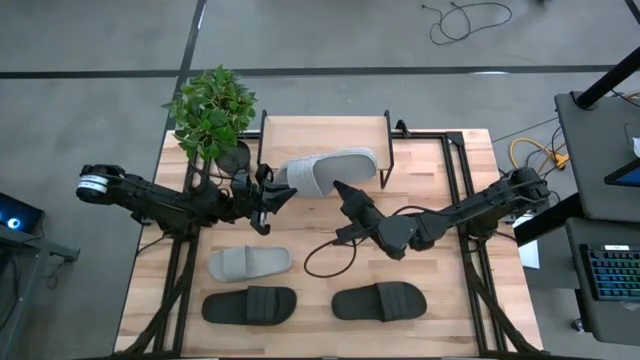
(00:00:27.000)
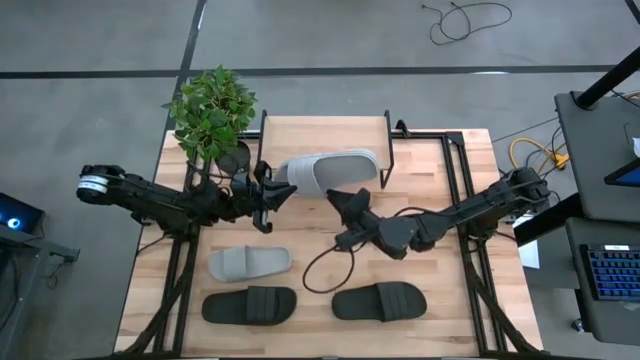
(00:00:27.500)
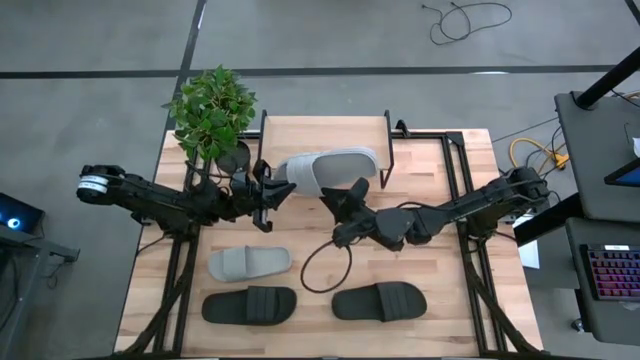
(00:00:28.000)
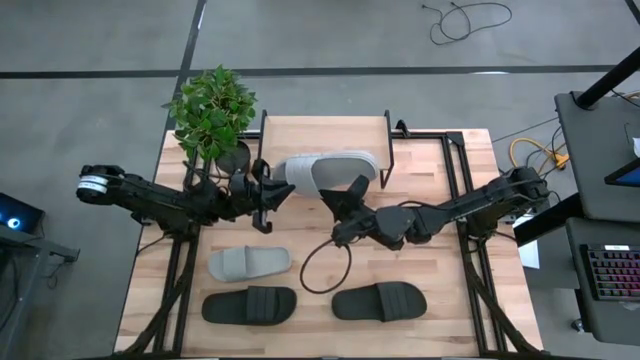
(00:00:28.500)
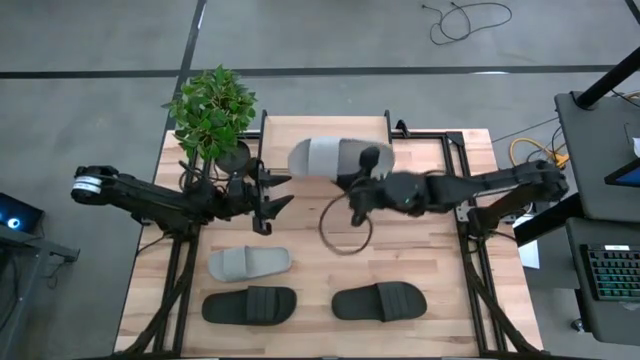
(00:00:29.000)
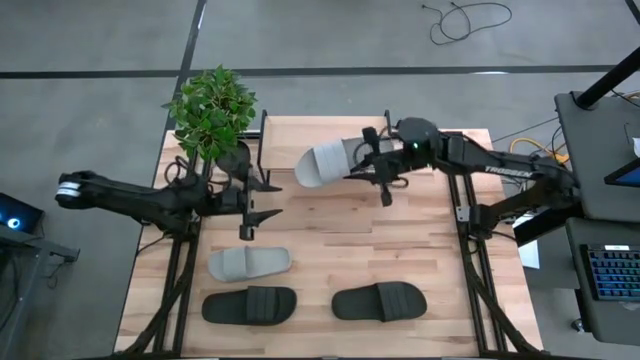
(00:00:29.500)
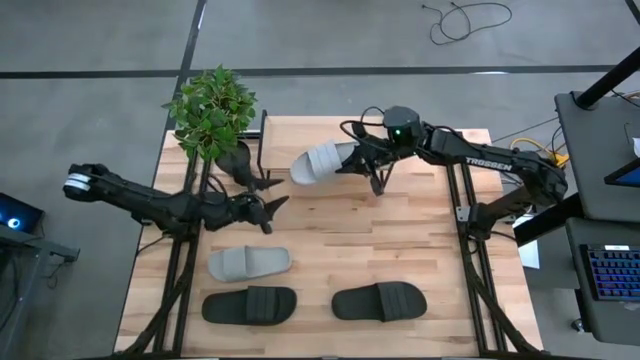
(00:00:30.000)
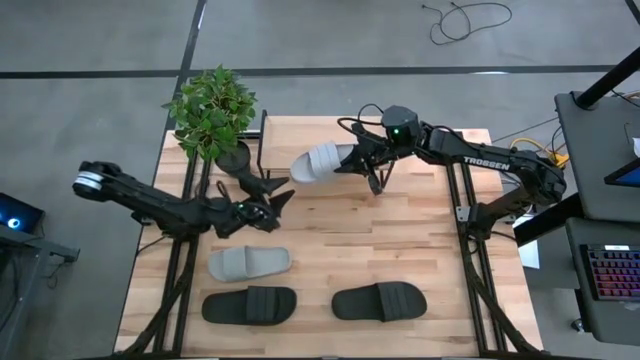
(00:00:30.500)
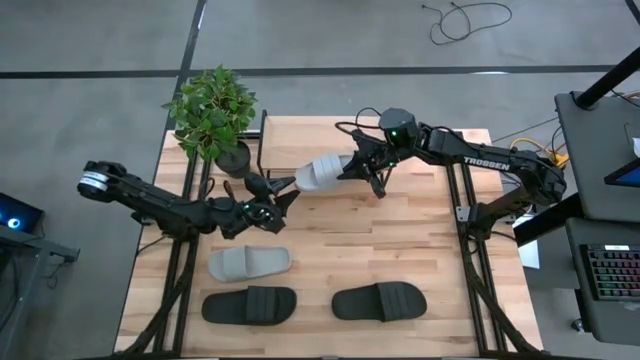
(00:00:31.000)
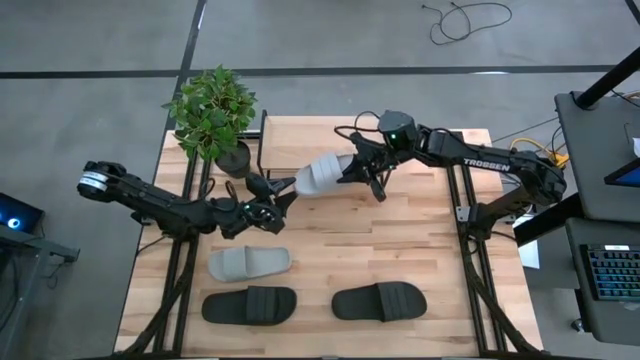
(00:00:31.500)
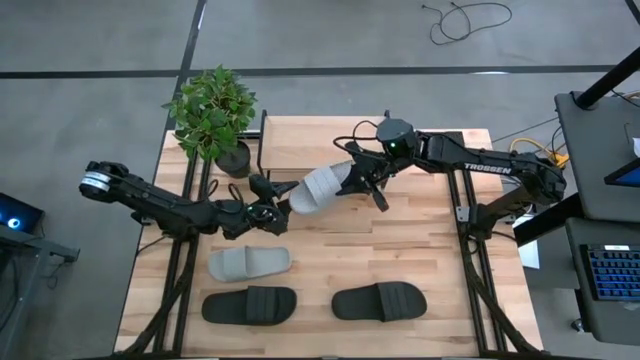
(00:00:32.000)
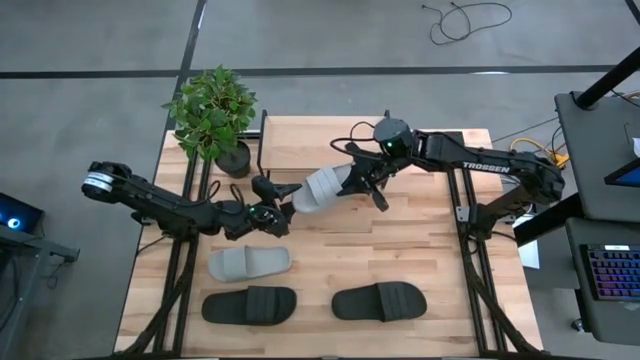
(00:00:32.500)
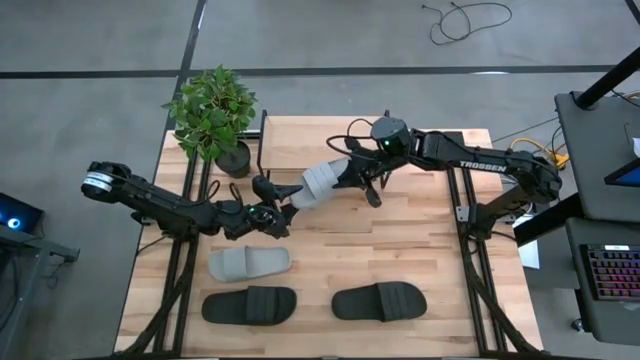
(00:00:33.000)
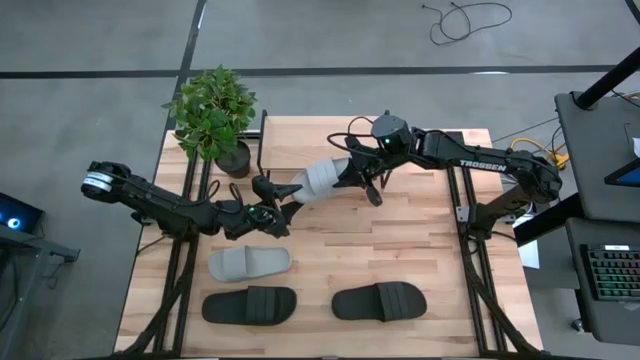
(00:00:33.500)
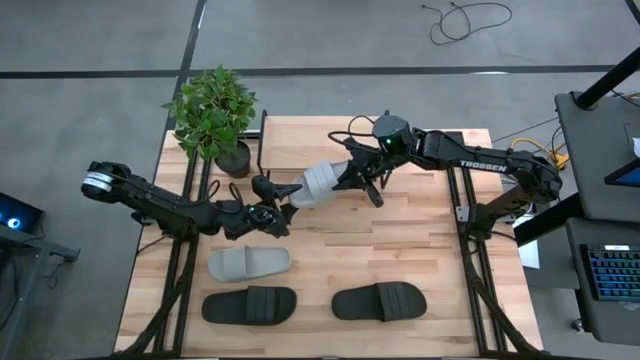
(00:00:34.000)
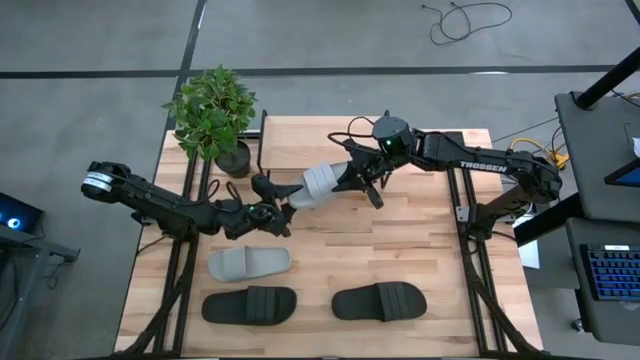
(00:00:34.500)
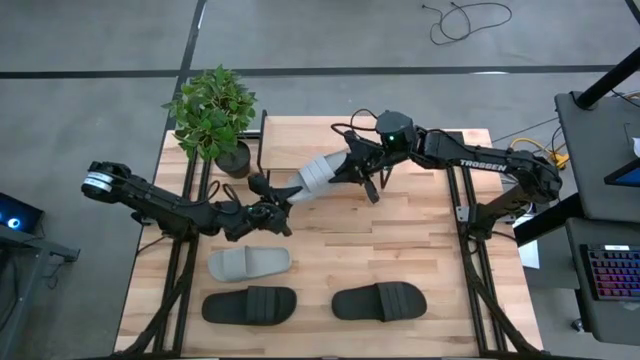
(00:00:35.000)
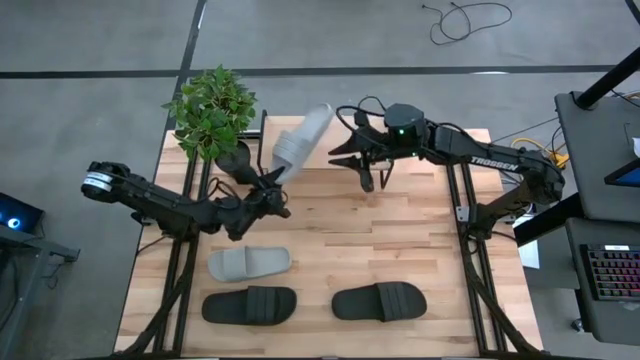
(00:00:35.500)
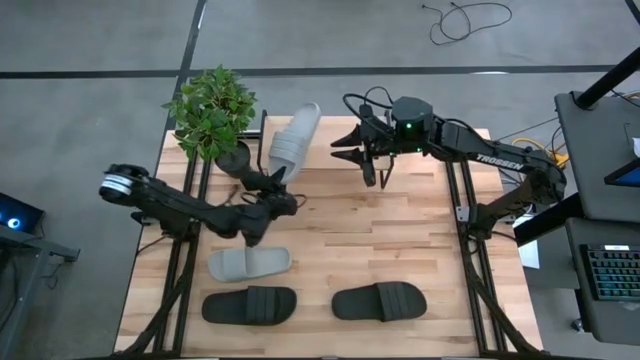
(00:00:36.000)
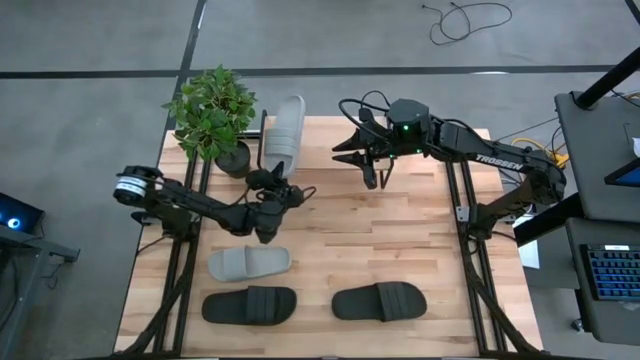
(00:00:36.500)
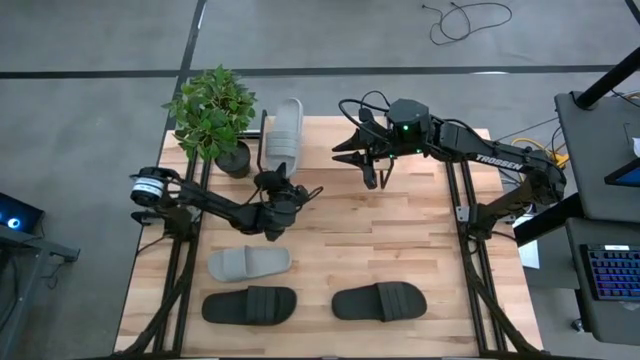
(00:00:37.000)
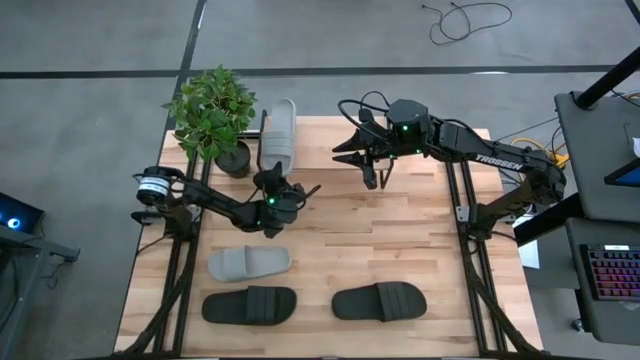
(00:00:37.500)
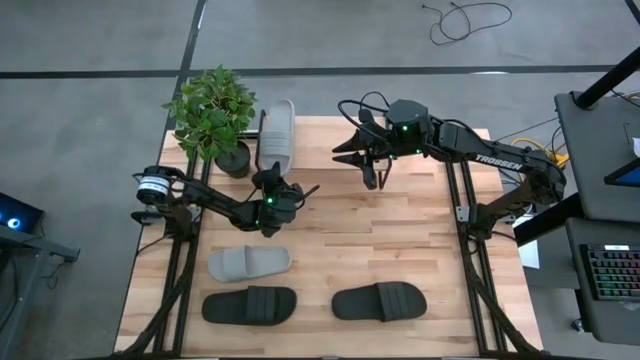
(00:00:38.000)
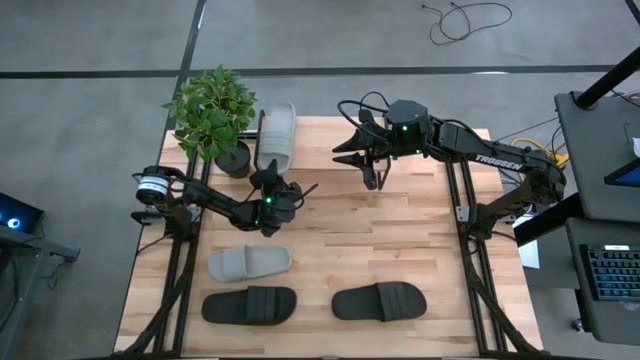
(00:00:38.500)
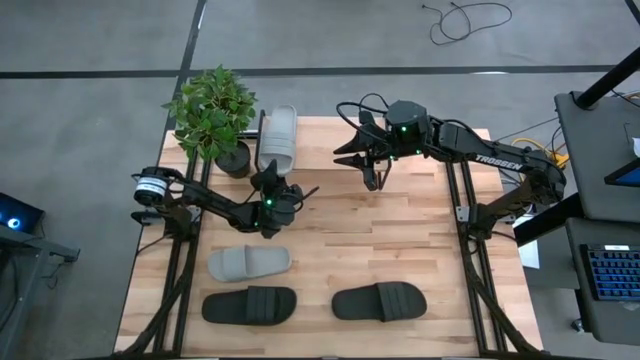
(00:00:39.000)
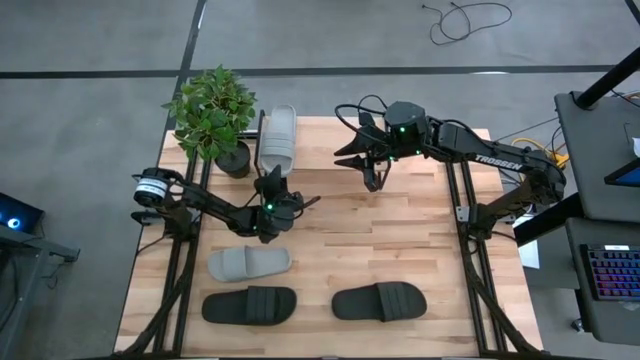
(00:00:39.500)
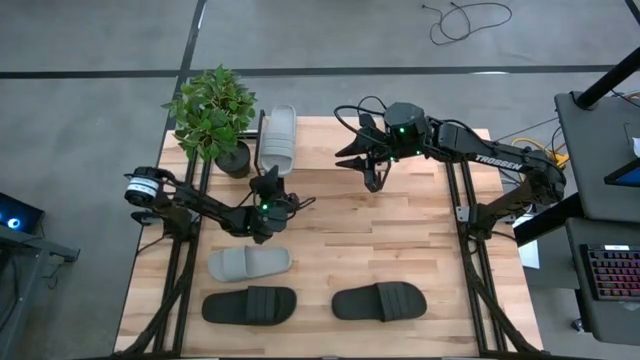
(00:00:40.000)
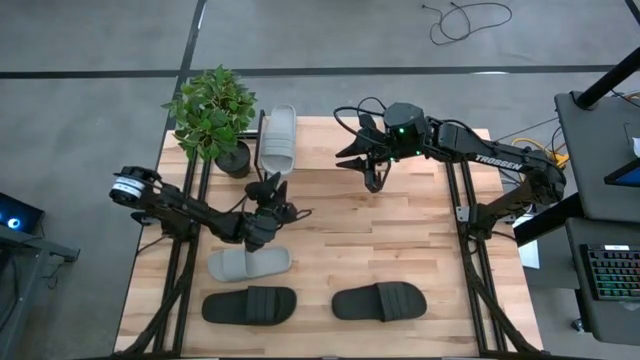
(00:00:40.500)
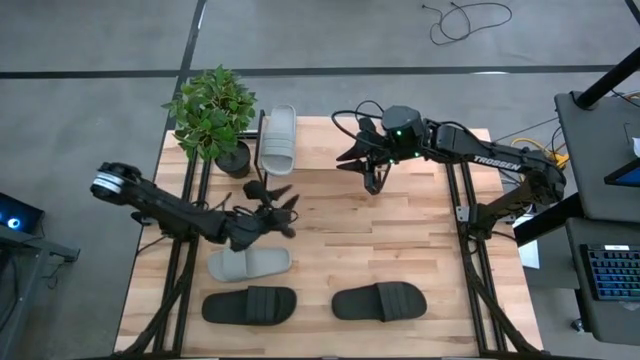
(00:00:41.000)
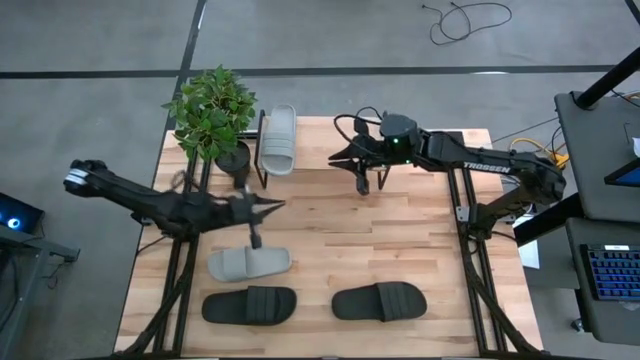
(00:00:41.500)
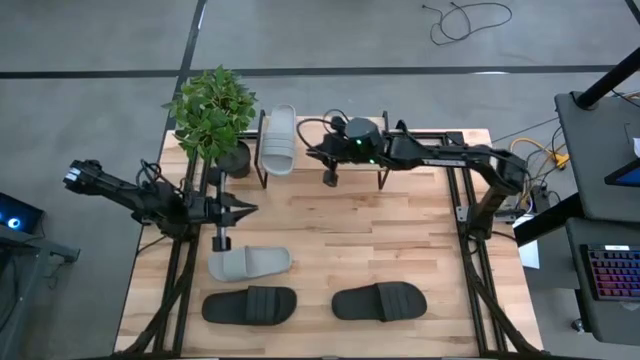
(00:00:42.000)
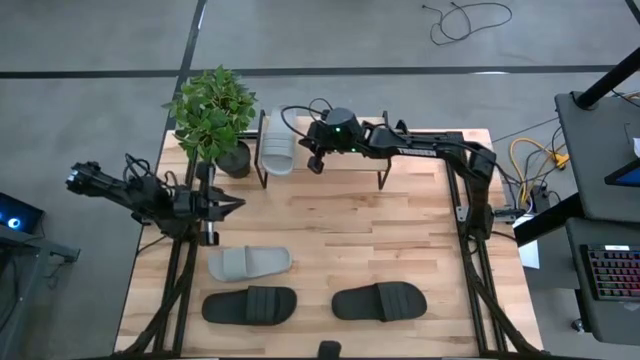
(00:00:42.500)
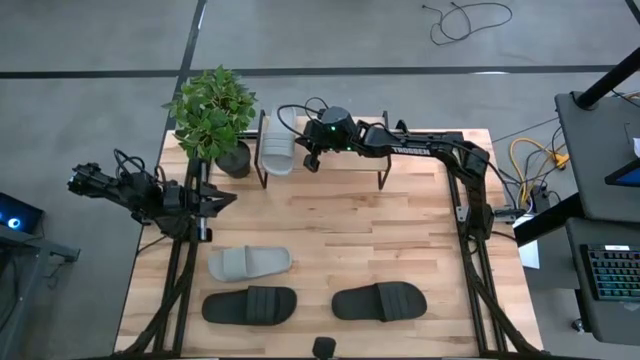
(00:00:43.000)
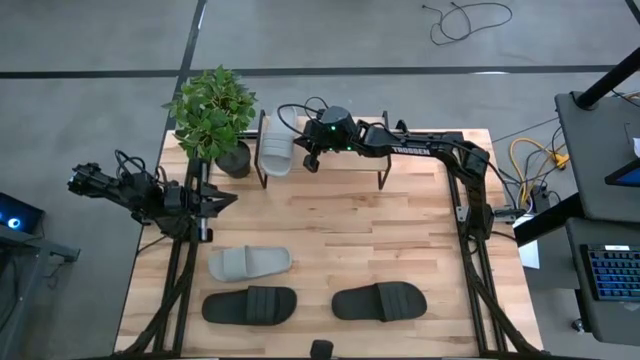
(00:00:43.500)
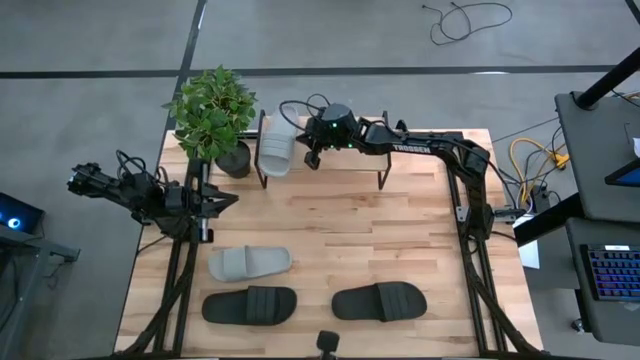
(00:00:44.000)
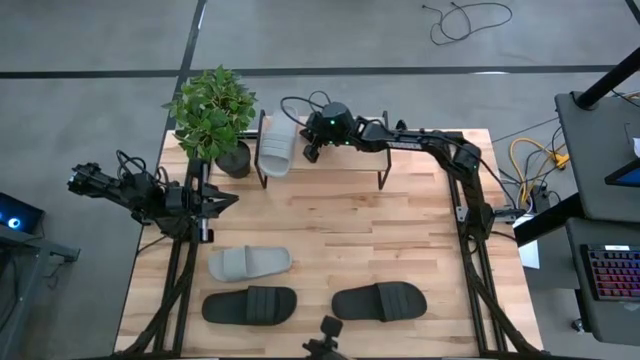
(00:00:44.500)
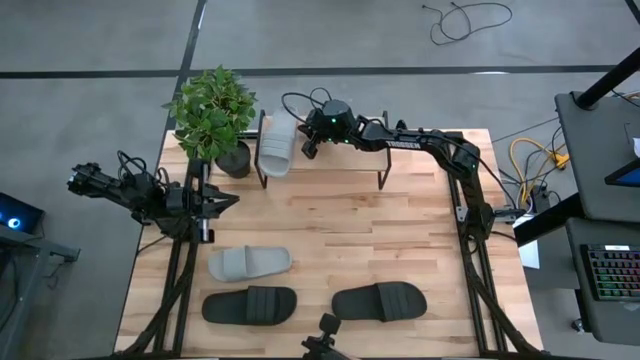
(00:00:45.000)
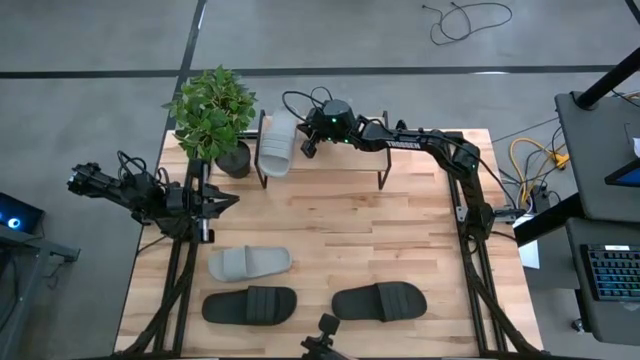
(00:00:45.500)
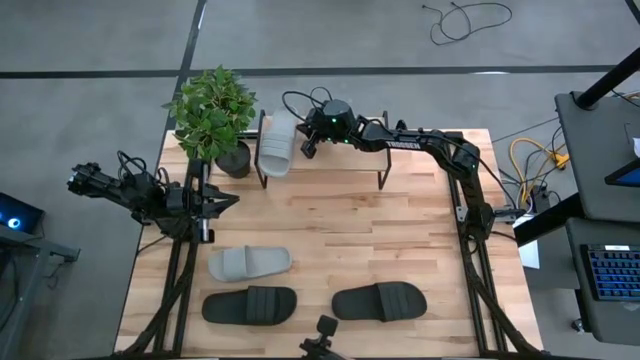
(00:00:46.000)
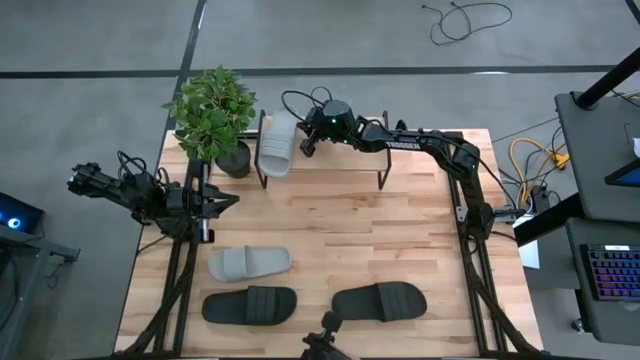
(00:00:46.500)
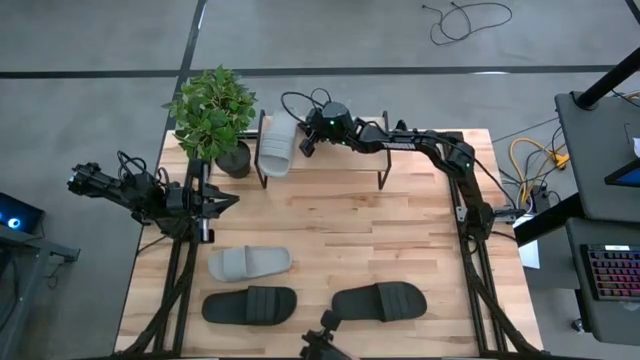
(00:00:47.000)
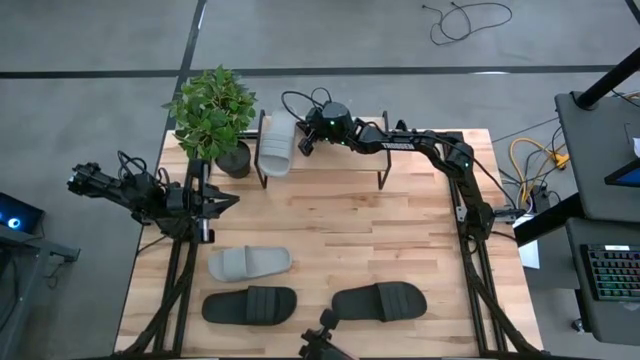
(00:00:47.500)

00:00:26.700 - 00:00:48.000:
Task: Pick and place slides into the shelf
Put the right grey slipper on the shelf
